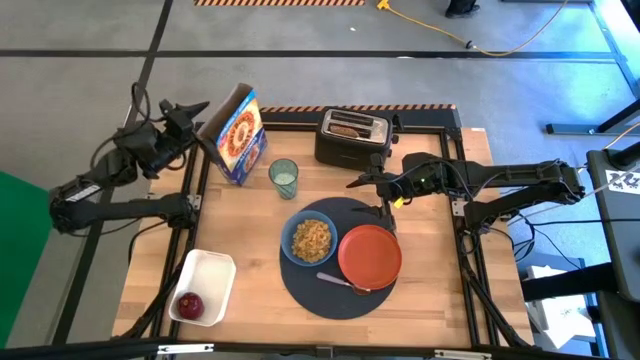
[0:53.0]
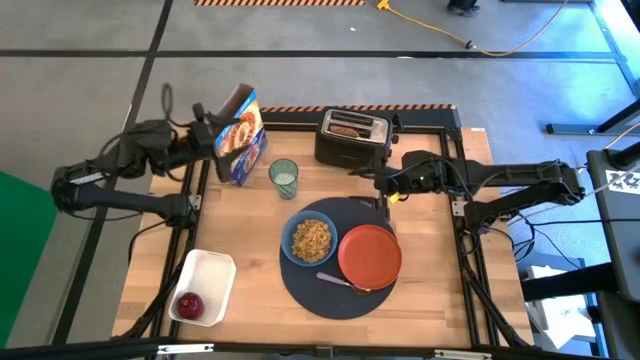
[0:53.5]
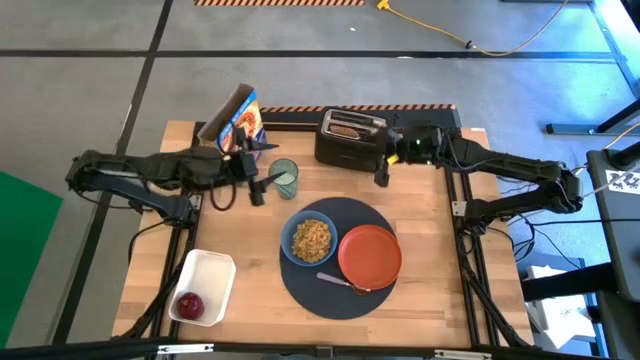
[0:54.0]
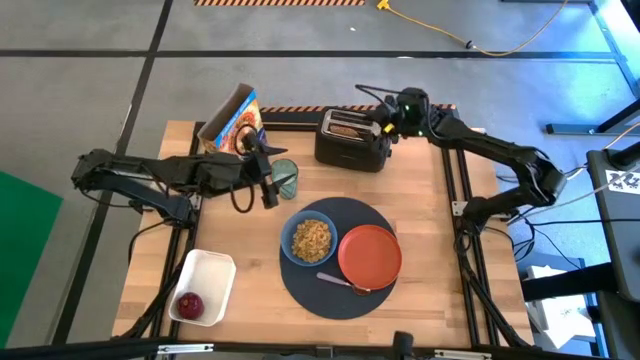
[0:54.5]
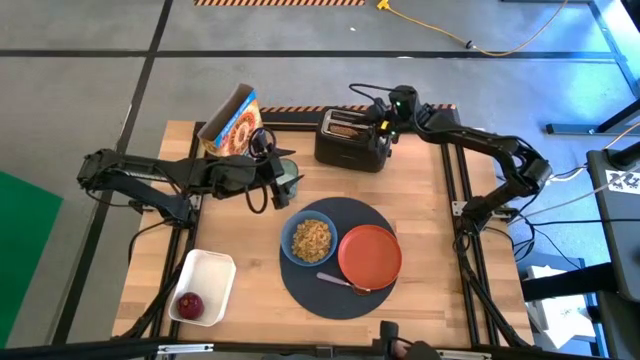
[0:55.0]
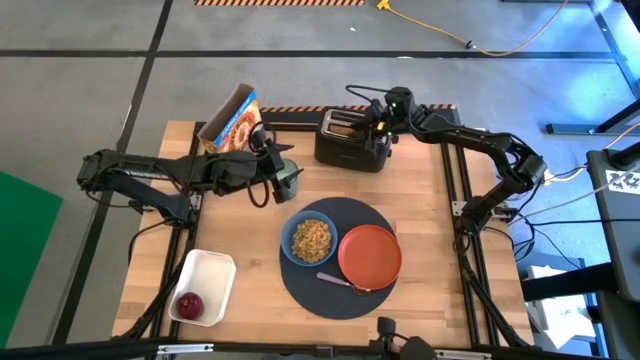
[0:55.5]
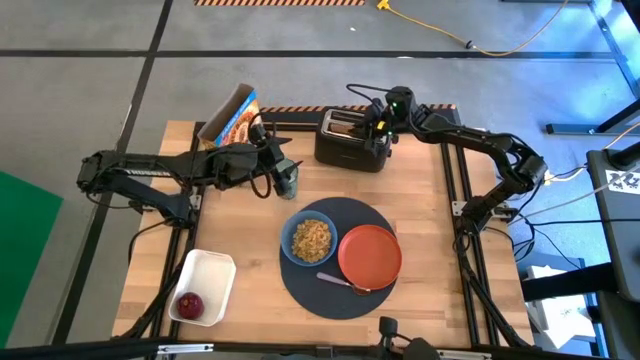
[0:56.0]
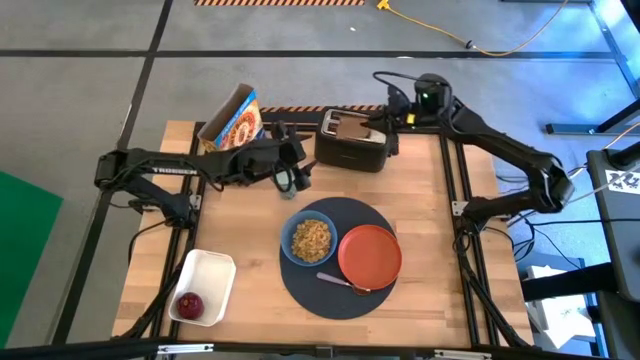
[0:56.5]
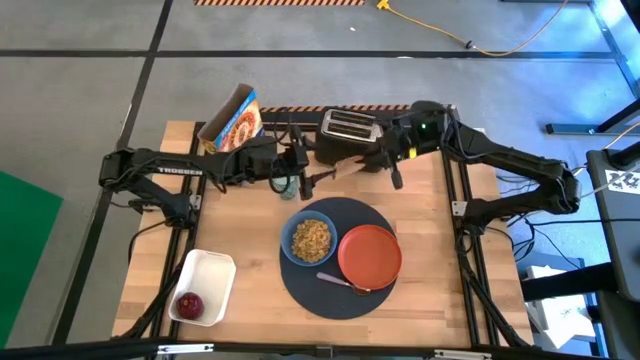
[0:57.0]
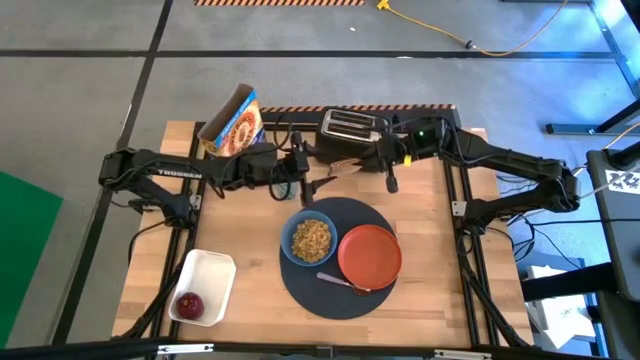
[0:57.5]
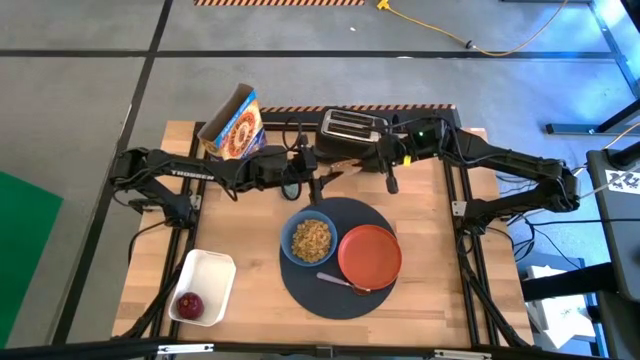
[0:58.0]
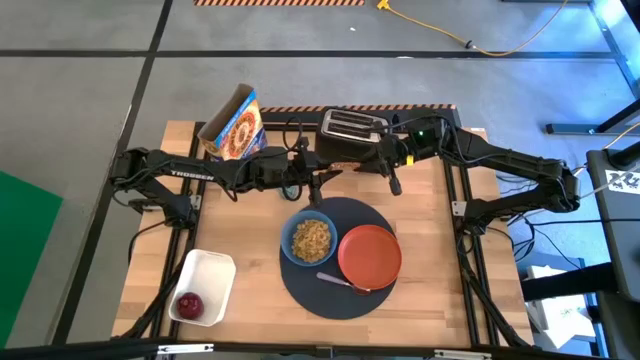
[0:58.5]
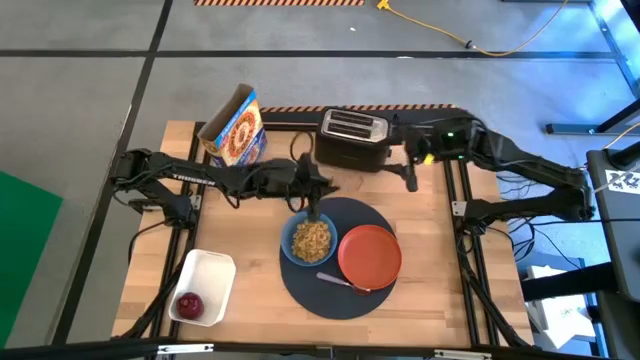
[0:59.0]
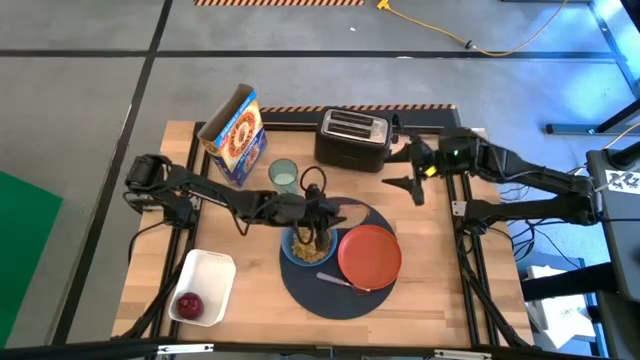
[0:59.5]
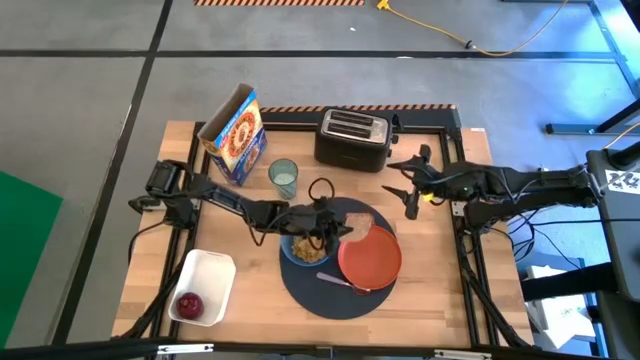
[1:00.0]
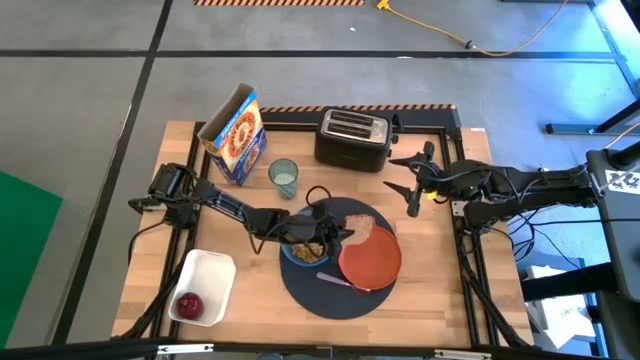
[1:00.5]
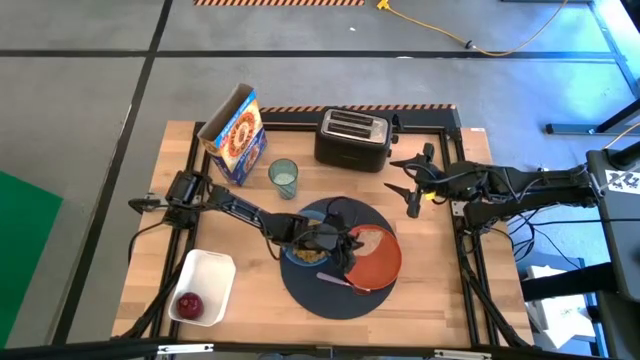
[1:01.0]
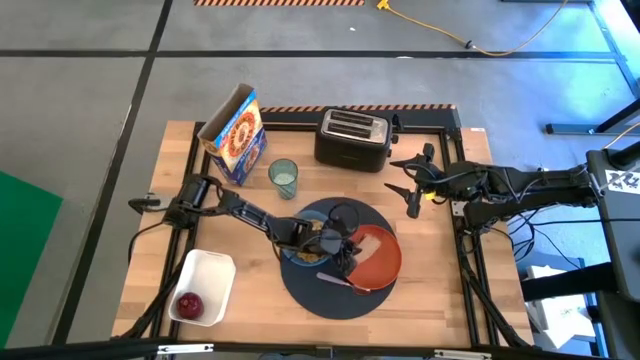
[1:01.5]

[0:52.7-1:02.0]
Task: Arrange a breakfast setting
Put the toasted bread on the orange plate

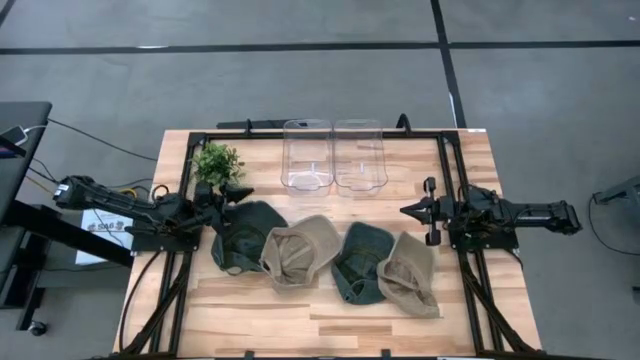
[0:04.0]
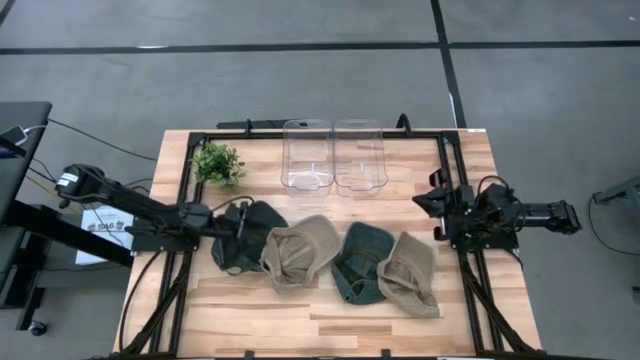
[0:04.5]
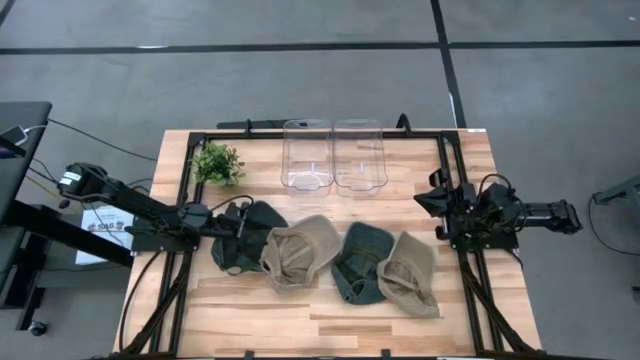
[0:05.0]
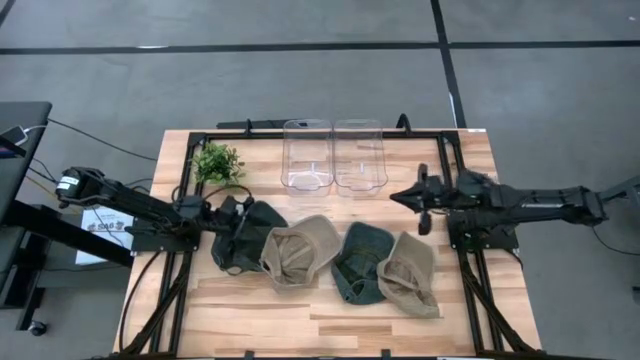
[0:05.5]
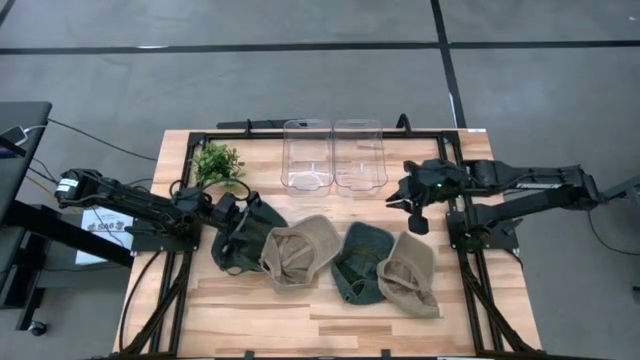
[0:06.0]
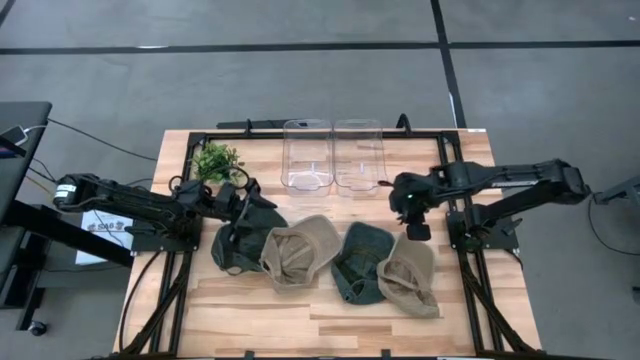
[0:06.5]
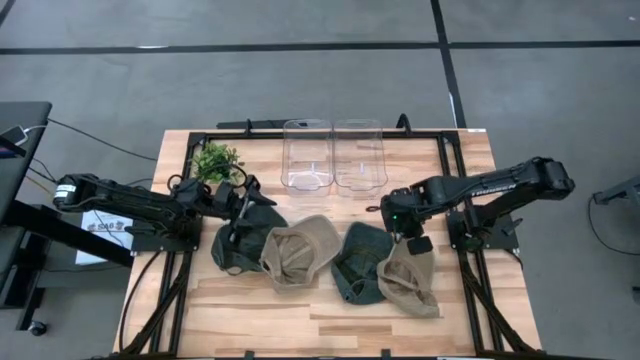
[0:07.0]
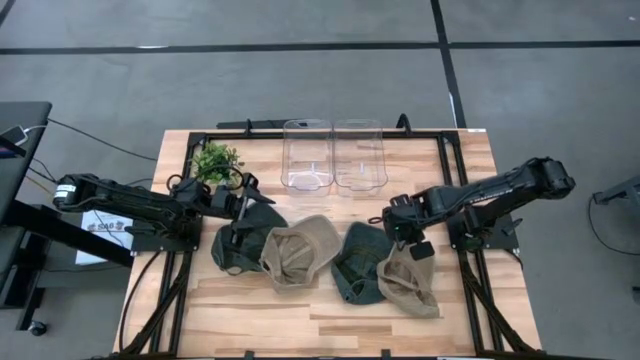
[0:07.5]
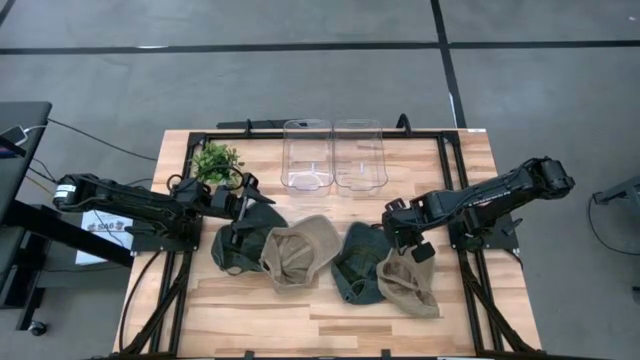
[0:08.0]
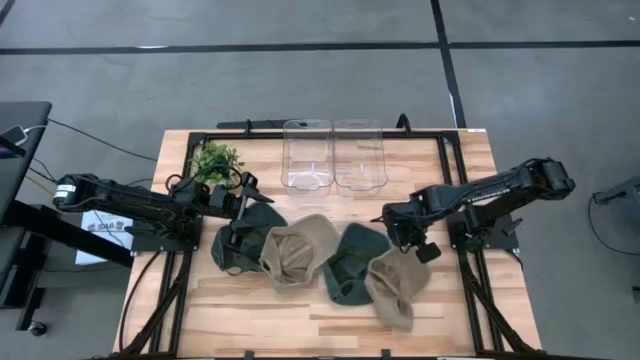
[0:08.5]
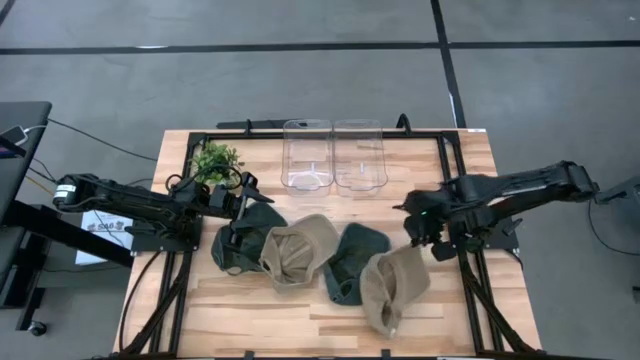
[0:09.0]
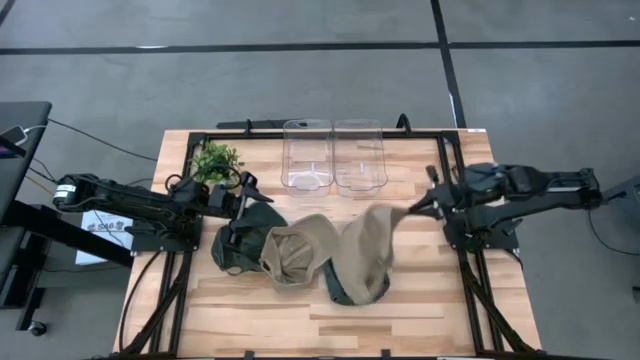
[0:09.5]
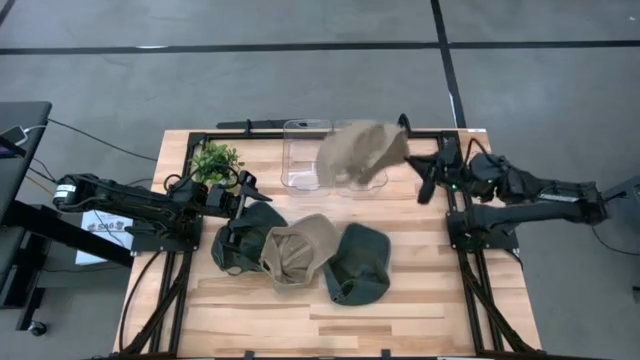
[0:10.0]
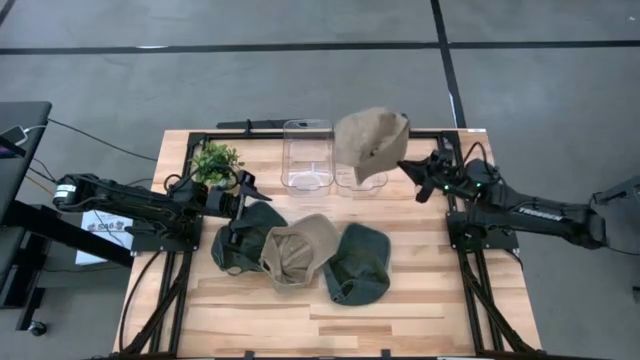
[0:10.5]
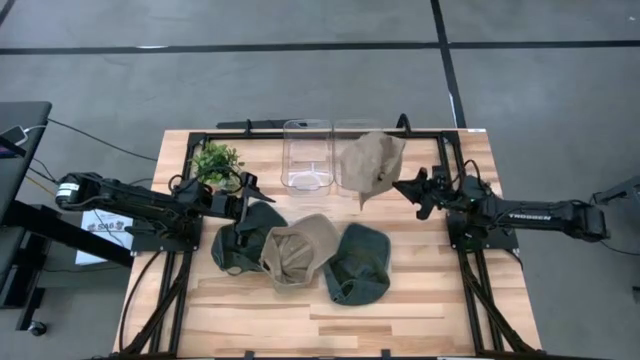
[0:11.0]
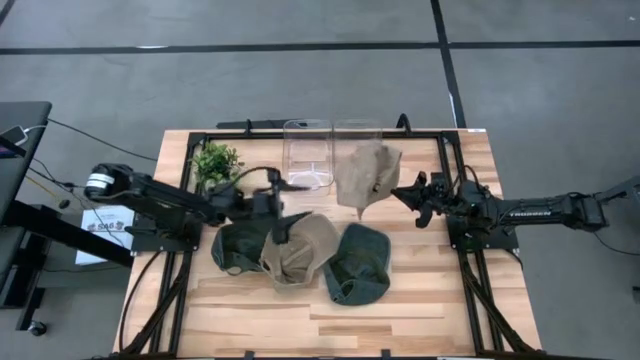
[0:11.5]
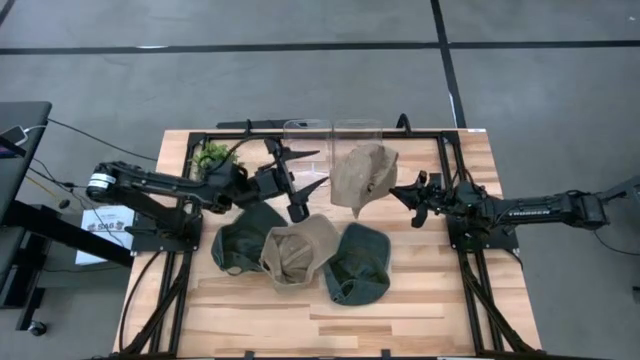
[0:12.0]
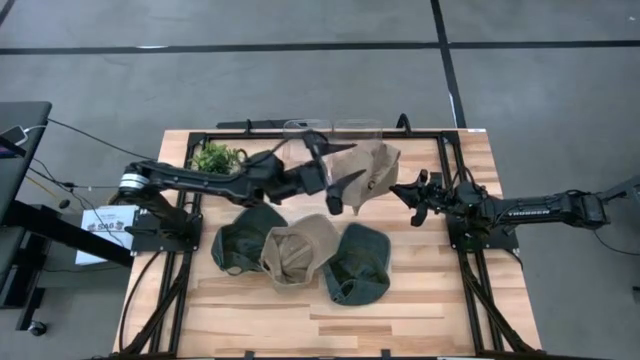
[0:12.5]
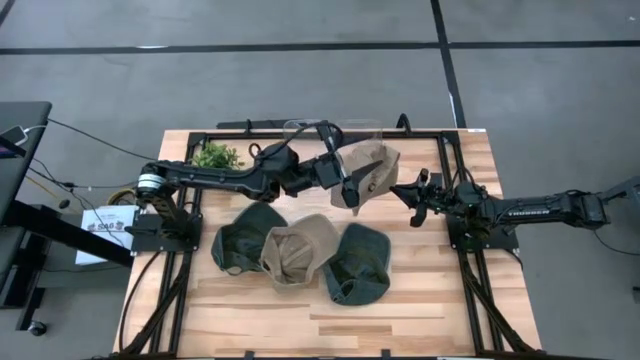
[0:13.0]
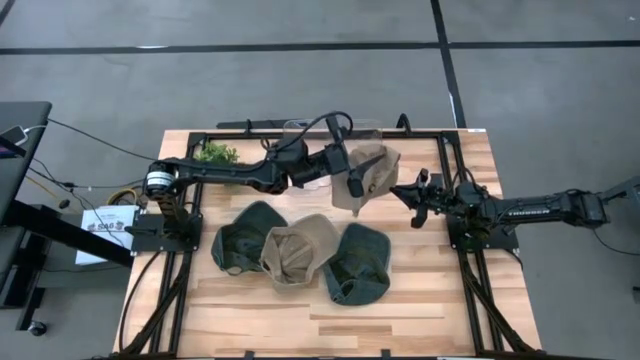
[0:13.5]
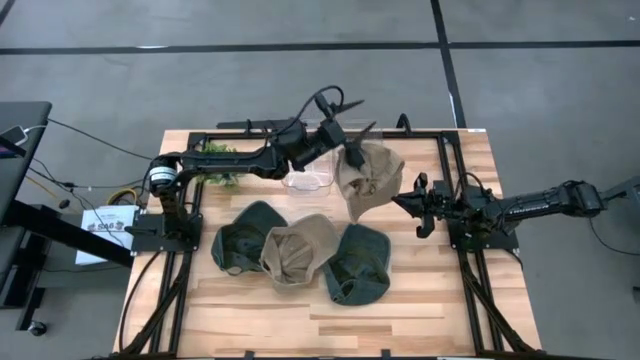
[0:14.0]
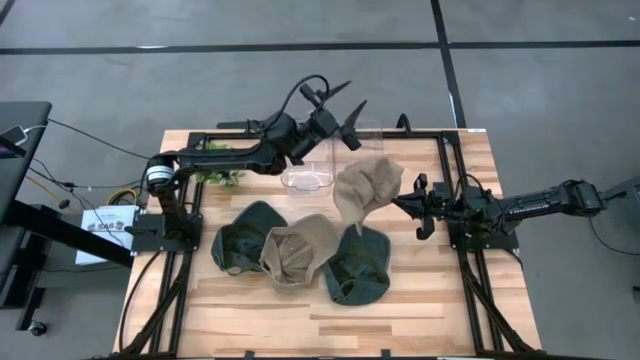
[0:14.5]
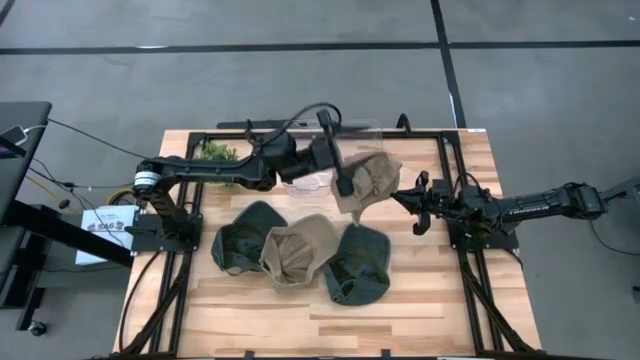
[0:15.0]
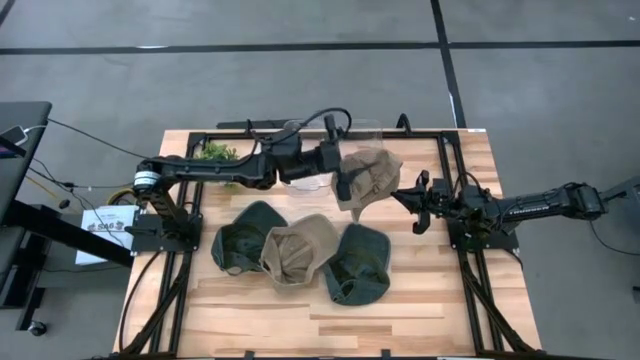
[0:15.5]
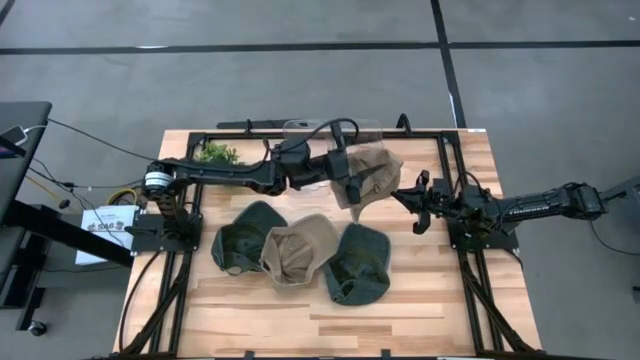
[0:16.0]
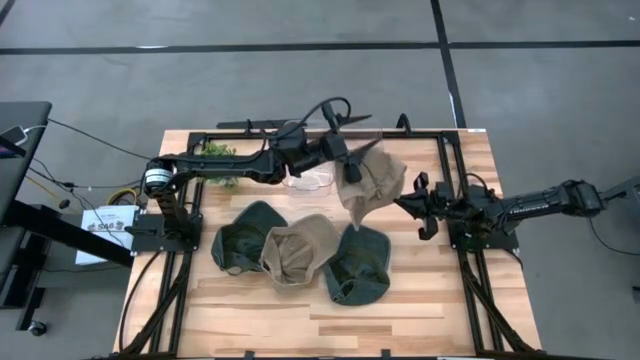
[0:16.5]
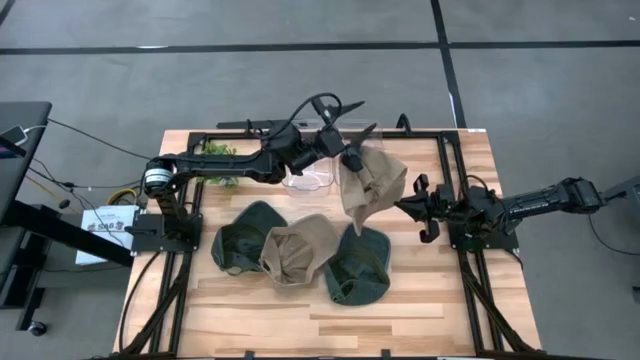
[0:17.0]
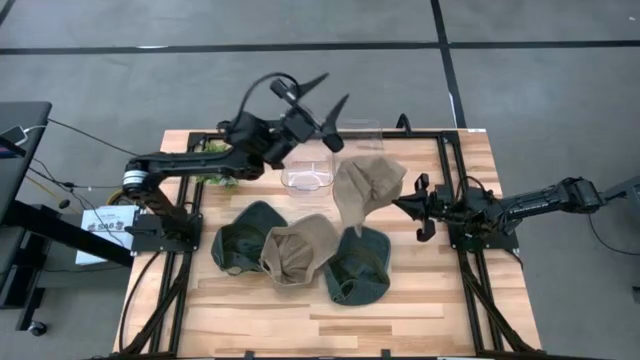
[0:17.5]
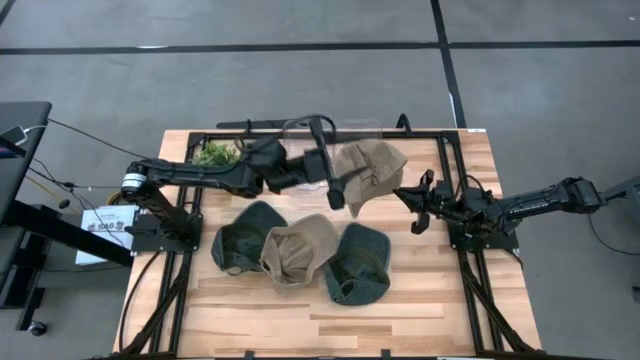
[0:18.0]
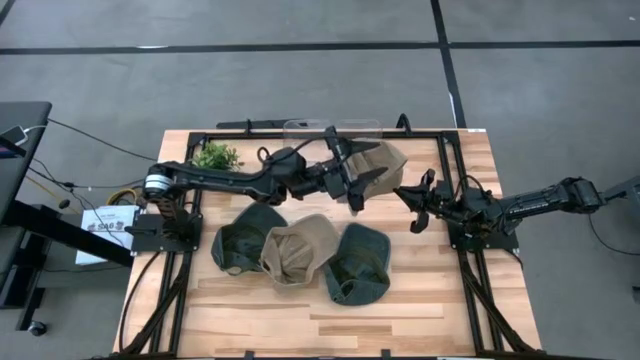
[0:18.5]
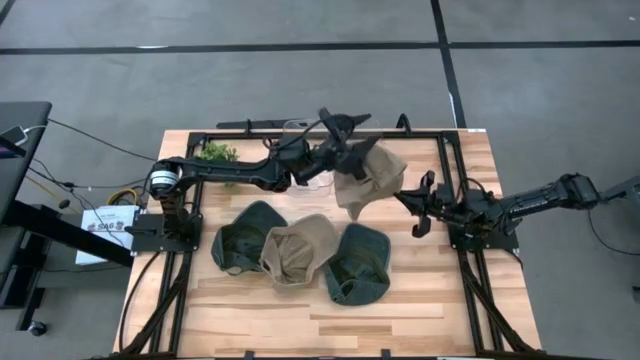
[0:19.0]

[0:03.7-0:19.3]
Task: Pick & Place hat
Put the right brown cap into the right transparent bin
